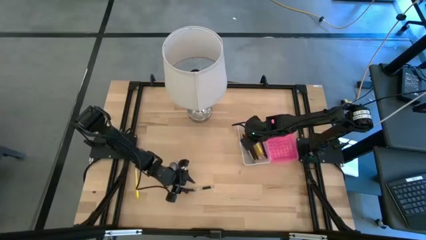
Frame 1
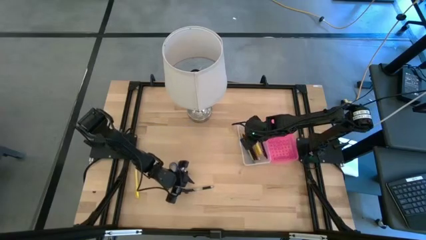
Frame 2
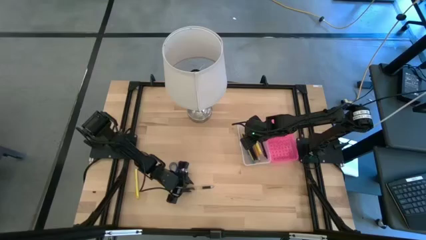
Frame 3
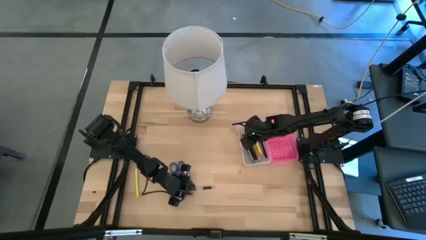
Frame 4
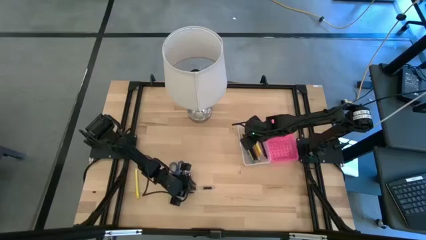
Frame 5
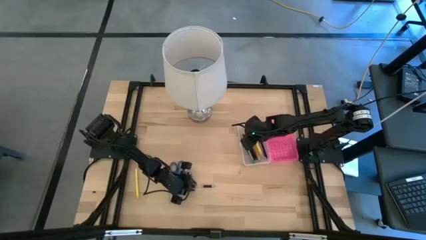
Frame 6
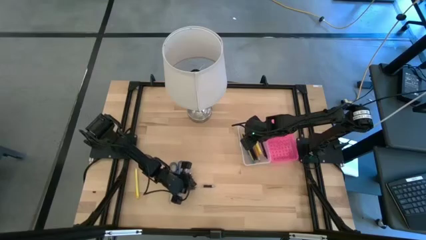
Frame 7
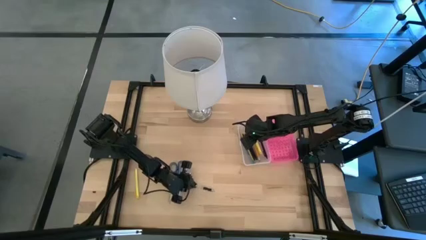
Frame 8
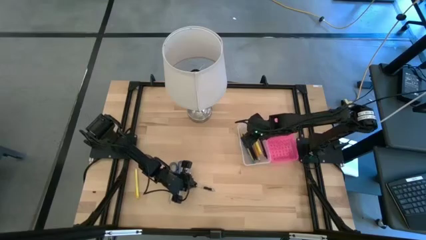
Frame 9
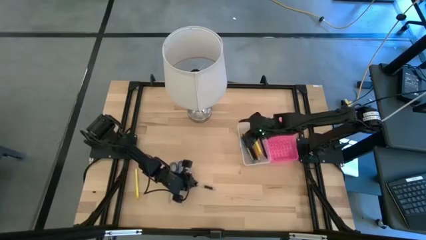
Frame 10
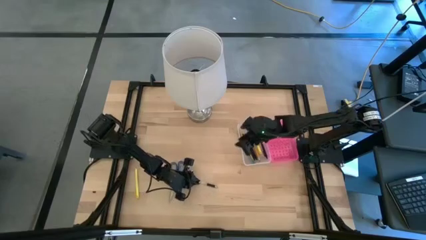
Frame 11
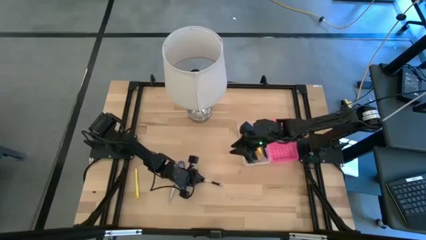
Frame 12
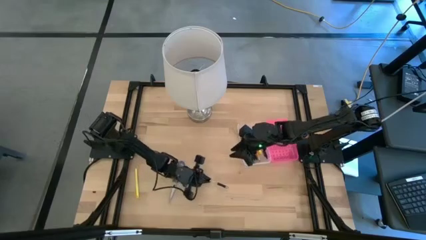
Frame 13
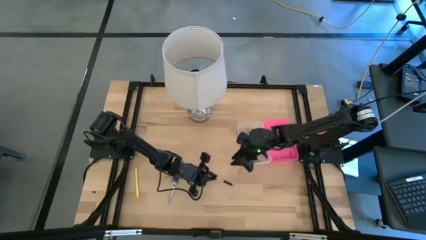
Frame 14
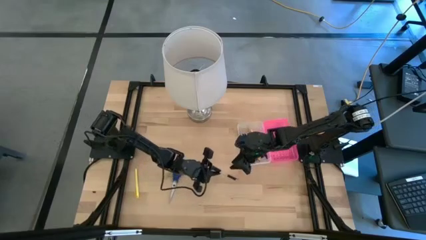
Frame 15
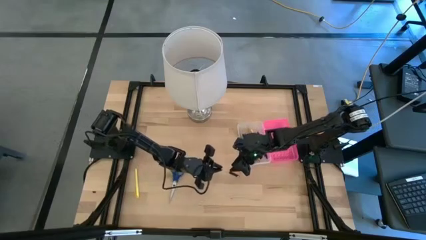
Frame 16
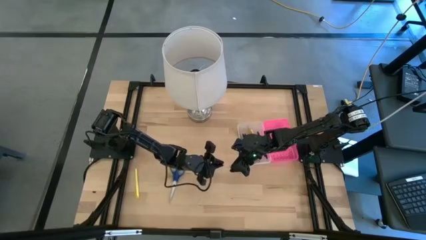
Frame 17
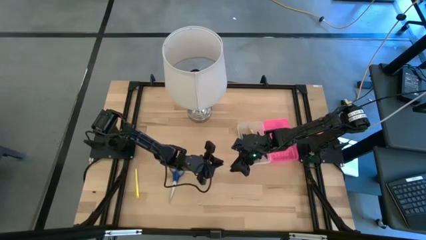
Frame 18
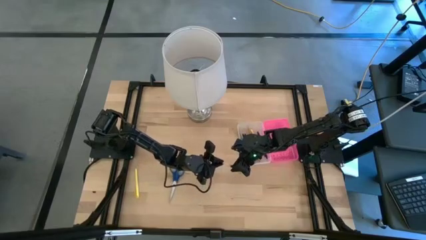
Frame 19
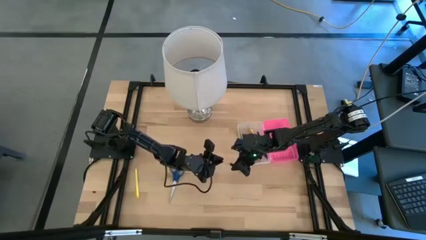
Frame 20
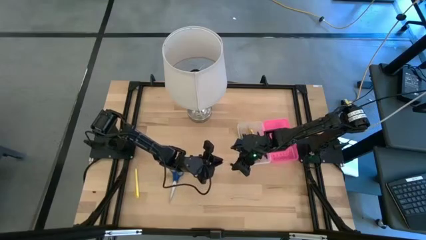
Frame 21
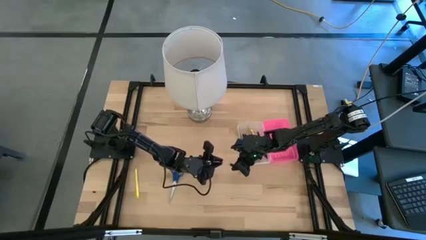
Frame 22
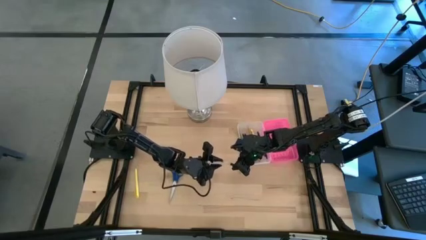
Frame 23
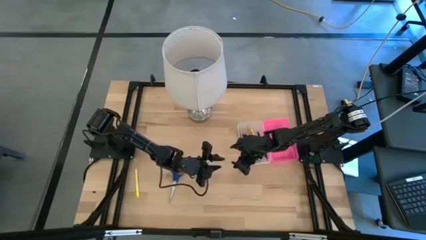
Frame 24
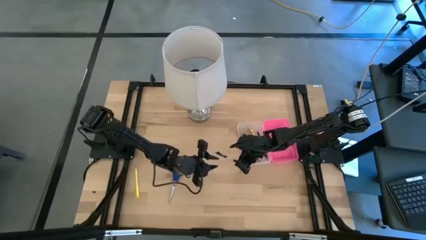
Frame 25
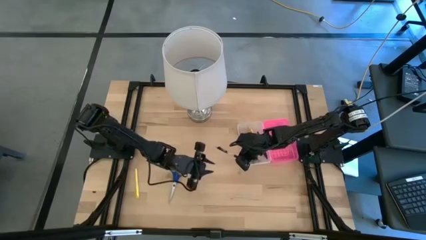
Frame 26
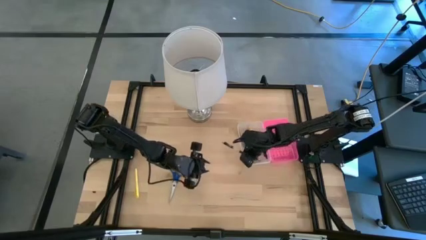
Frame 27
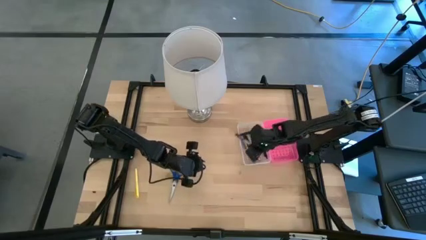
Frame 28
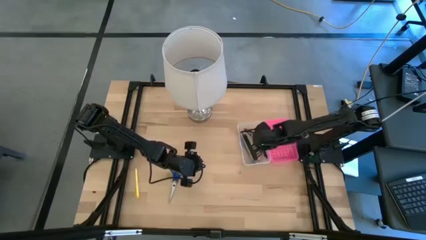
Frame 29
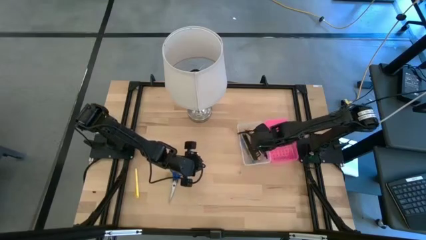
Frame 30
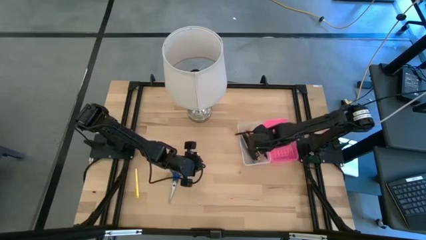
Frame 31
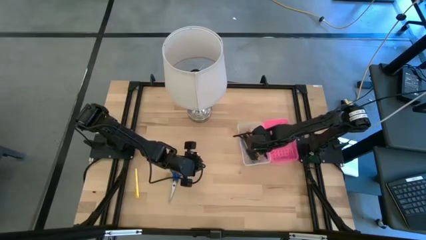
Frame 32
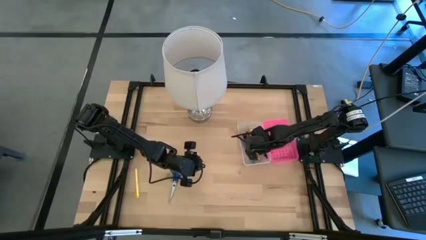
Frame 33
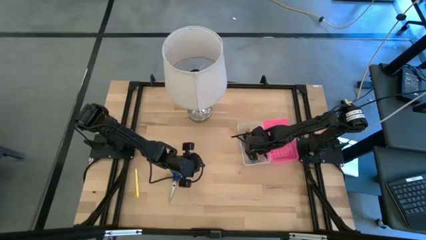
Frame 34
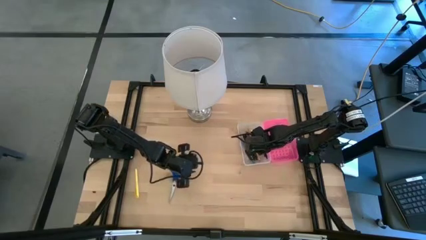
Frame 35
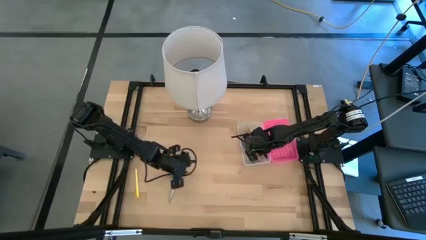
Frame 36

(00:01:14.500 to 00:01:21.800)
Task: Pick & place school supplies into a supply box
Put the black transparent pen into the supply box

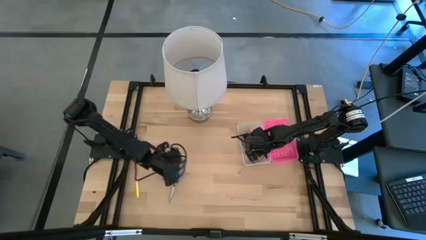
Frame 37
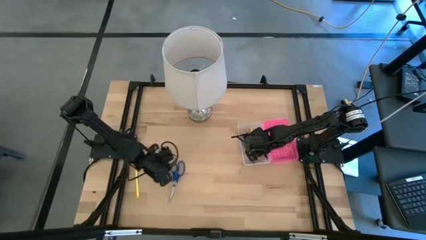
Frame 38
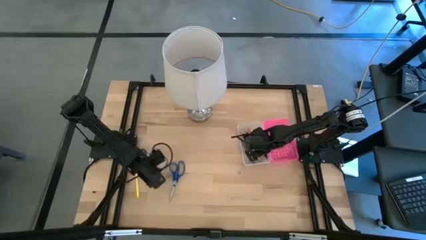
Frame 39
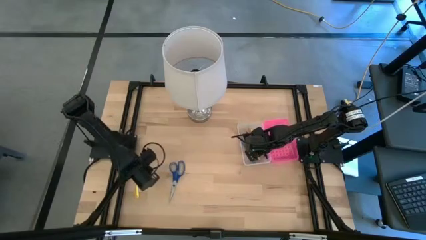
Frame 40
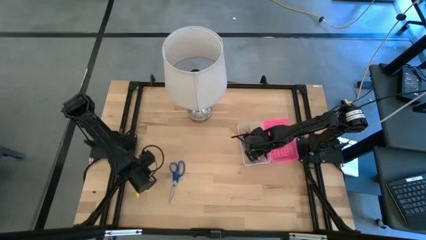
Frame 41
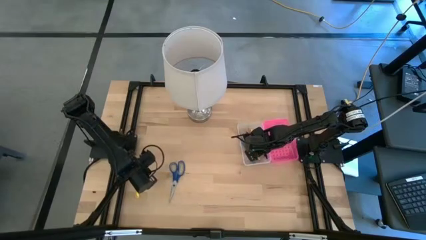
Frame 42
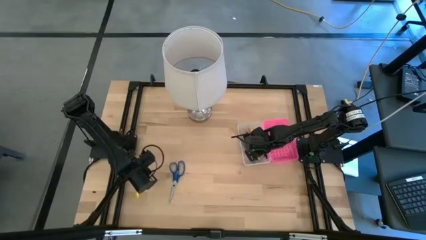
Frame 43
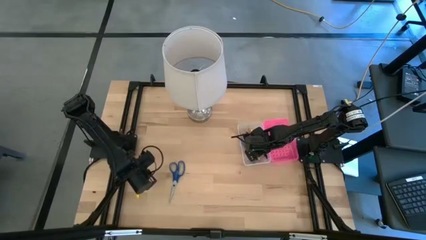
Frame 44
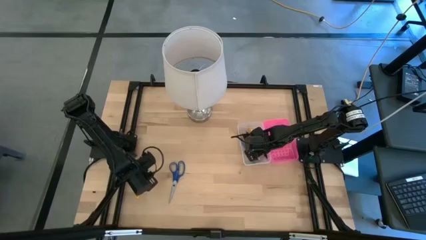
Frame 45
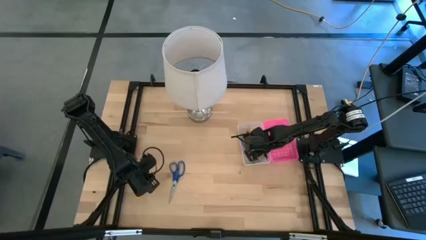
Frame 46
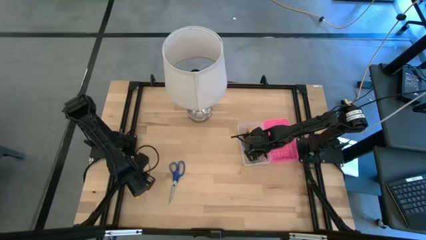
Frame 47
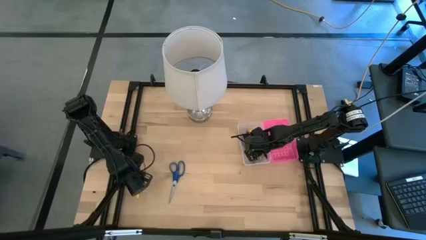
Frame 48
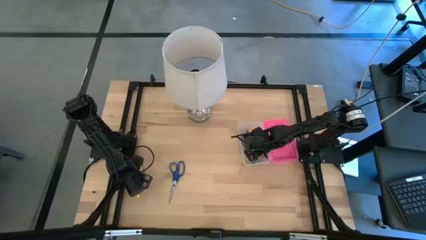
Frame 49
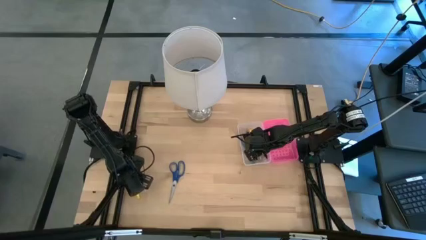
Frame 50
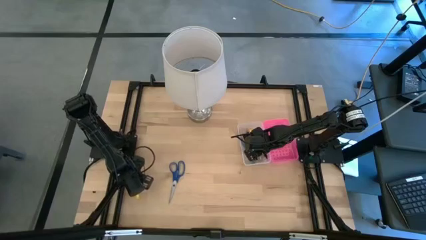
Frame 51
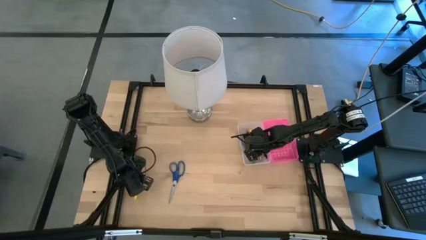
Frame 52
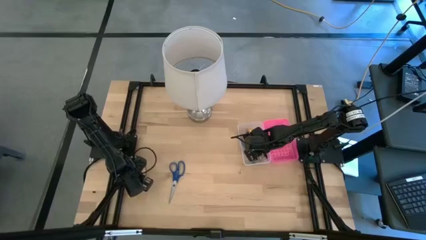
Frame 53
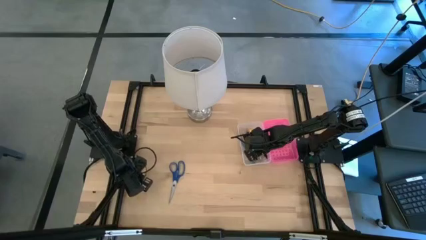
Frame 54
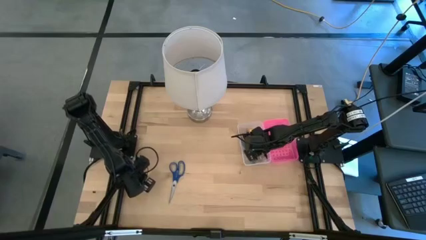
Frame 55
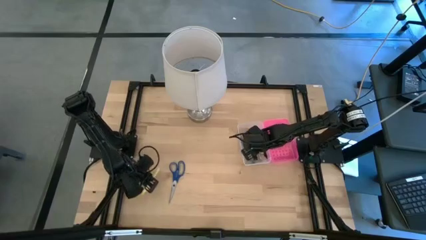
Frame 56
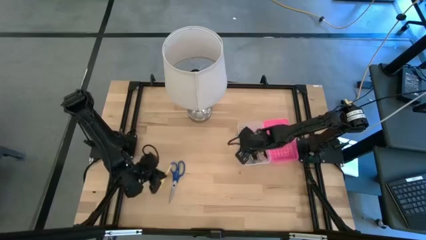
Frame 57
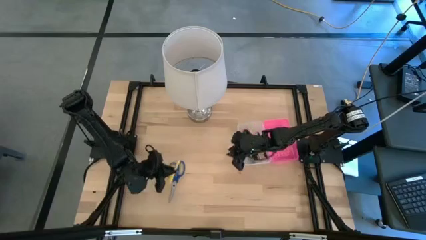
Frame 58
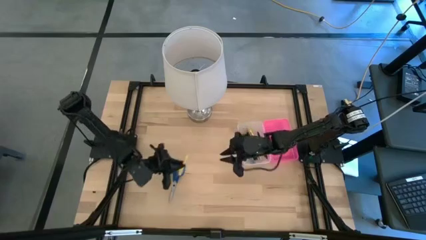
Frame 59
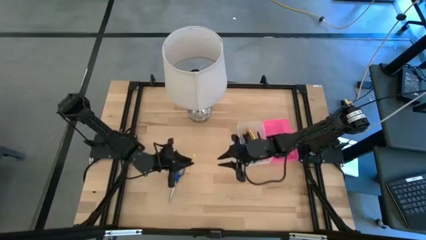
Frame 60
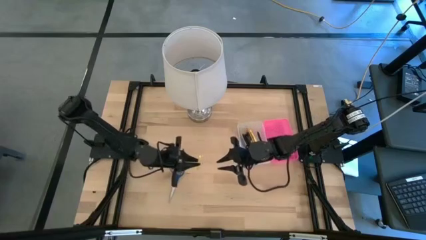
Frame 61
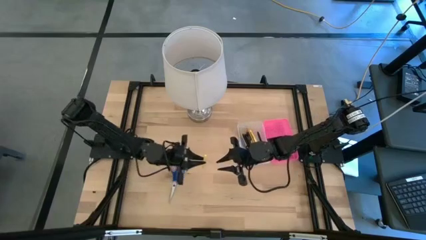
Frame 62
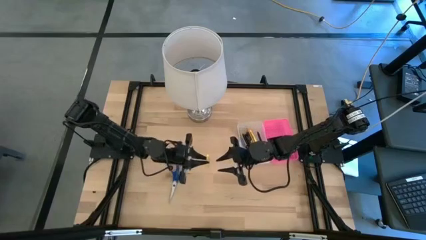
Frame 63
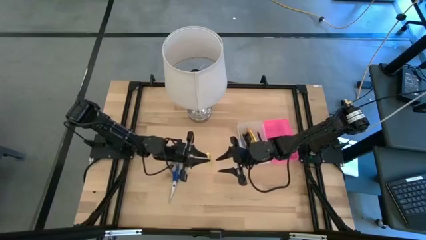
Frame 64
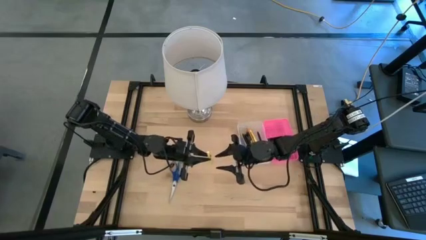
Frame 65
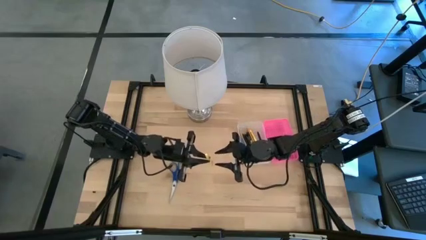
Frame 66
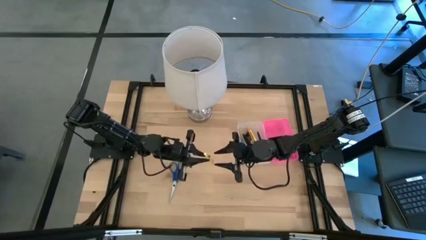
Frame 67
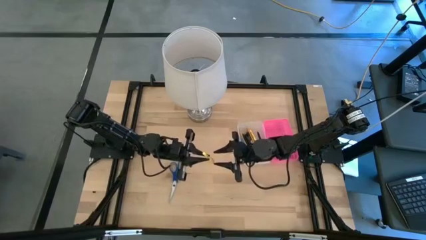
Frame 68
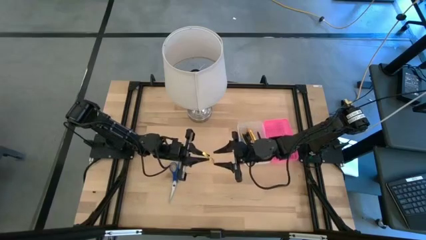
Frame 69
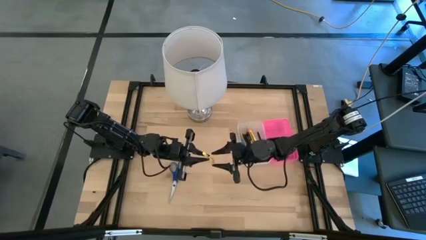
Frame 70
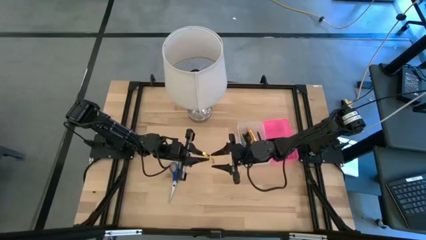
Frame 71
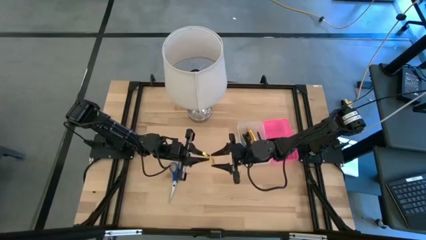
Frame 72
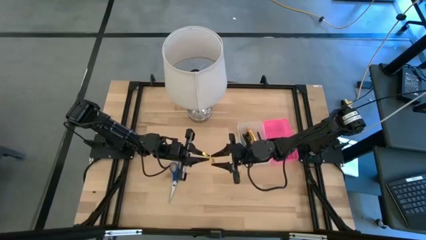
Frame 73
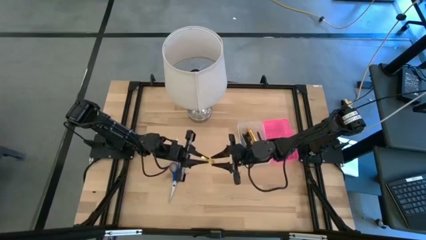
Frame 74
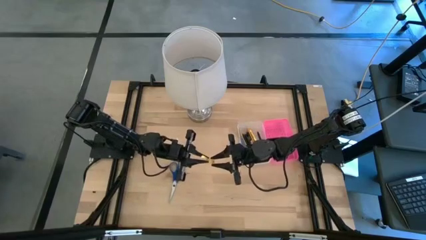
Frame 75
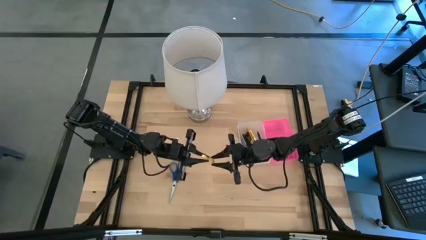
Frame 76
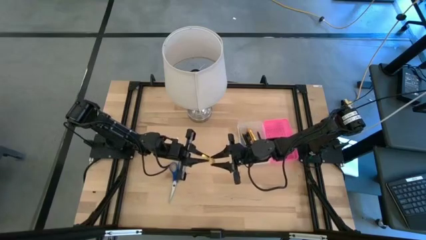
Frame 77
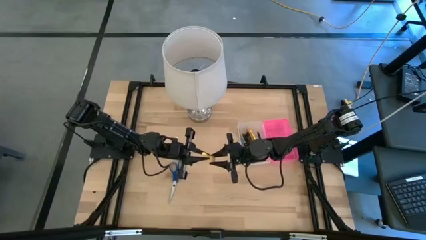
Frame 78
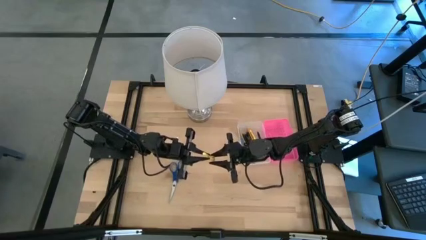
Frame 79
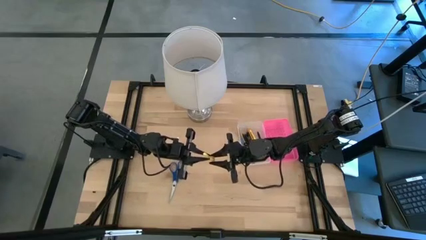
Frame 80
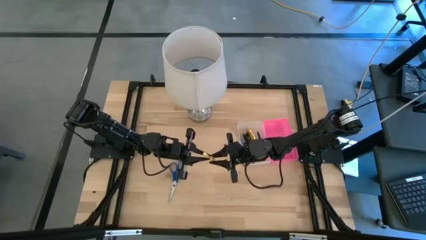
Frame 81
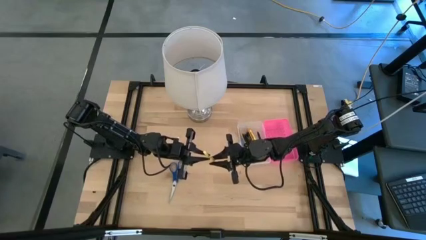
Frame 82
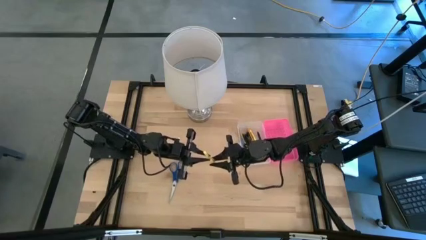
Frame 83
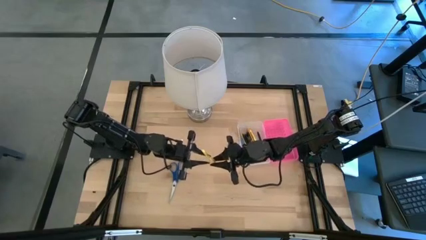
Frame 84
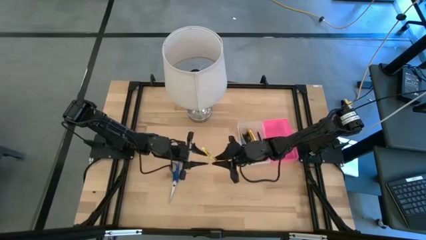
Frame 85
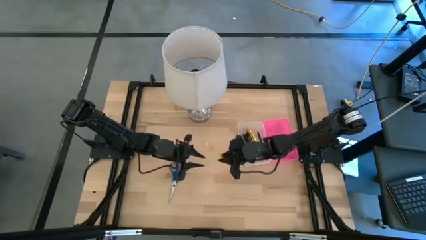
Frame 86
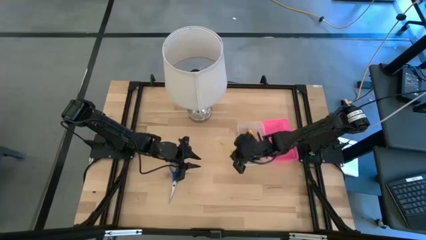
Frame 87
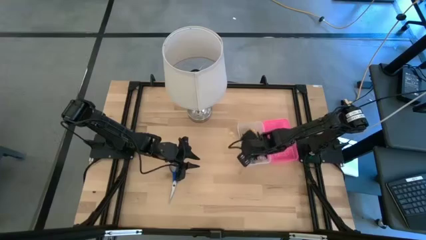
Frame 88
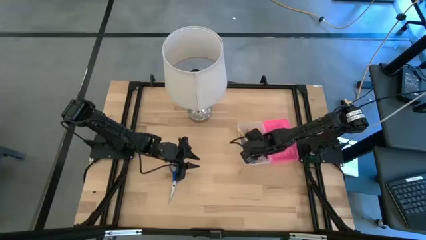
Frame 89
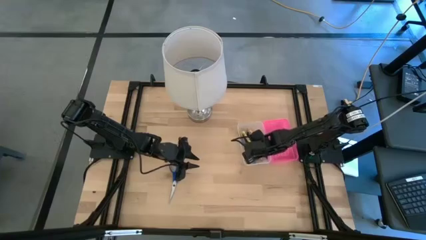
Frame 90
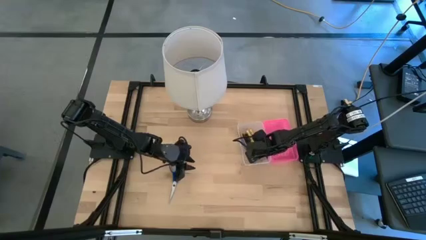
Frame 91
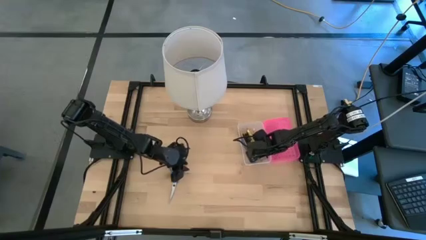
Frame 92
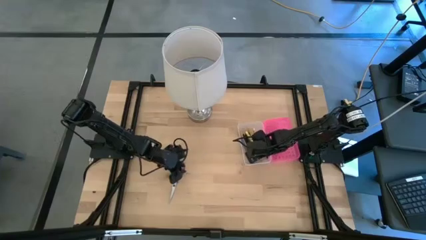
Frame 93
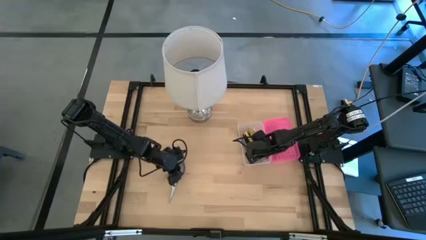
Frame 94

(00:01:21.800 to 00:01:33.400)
Put the yellow pen into the supply box
